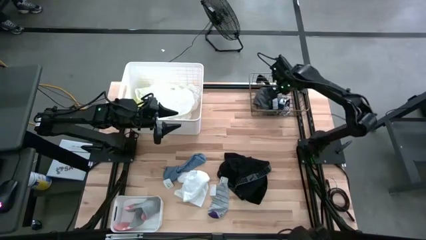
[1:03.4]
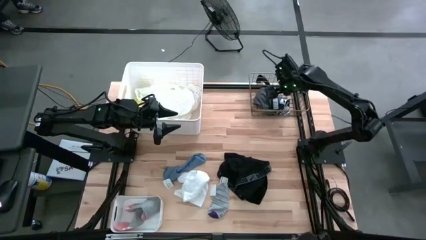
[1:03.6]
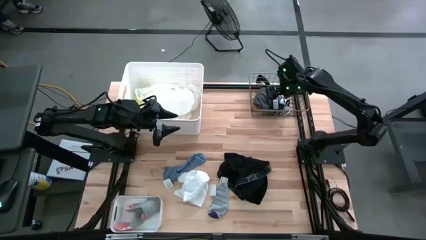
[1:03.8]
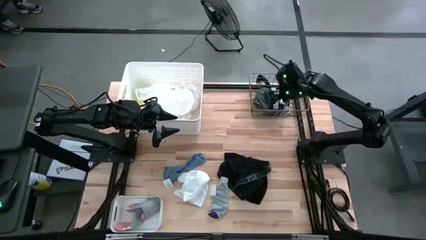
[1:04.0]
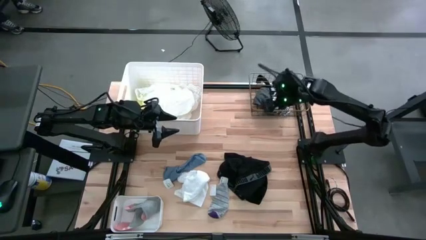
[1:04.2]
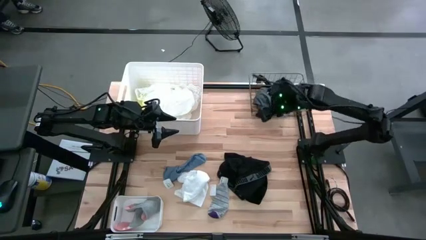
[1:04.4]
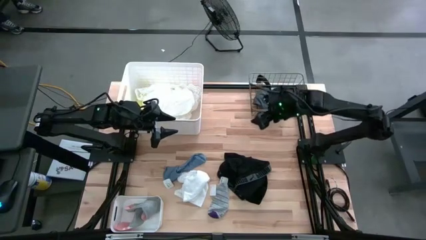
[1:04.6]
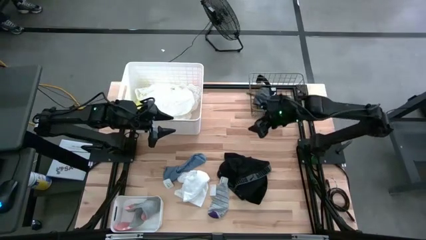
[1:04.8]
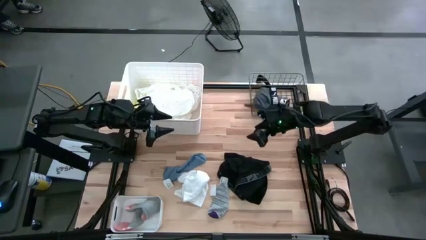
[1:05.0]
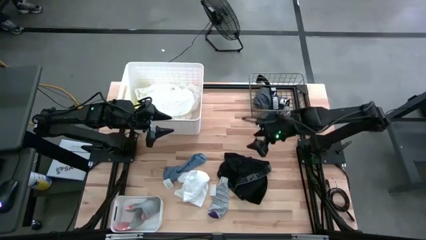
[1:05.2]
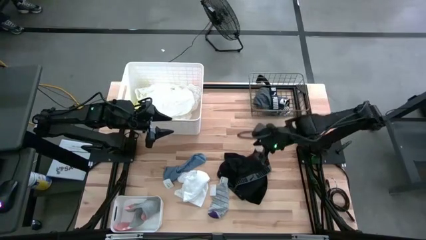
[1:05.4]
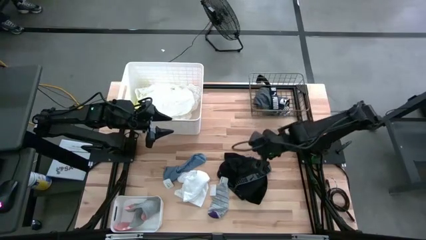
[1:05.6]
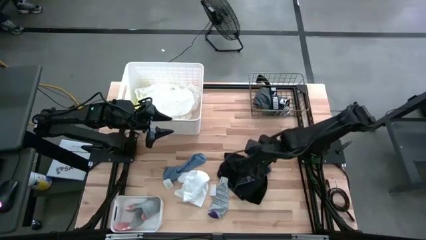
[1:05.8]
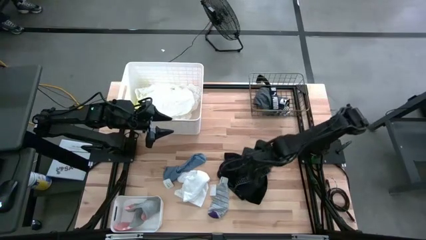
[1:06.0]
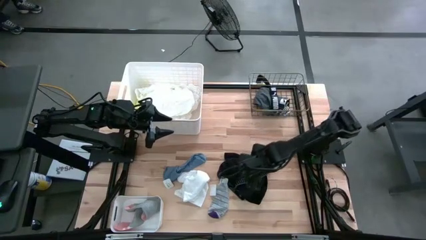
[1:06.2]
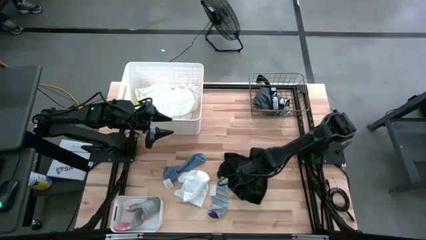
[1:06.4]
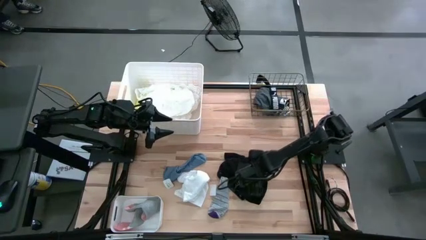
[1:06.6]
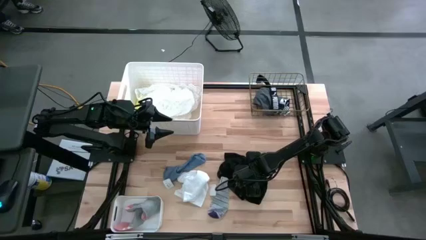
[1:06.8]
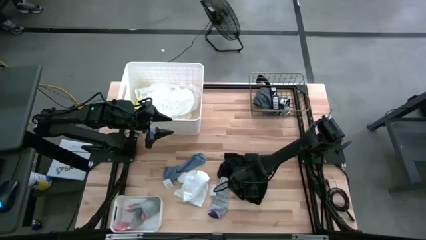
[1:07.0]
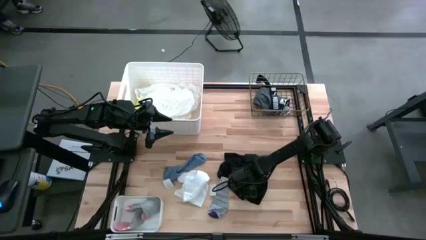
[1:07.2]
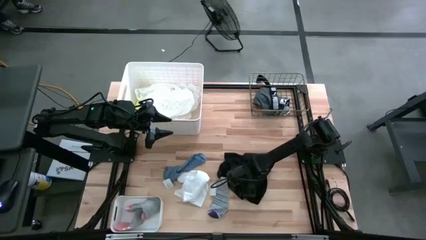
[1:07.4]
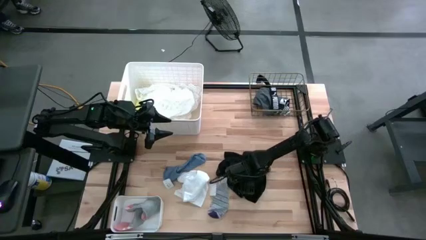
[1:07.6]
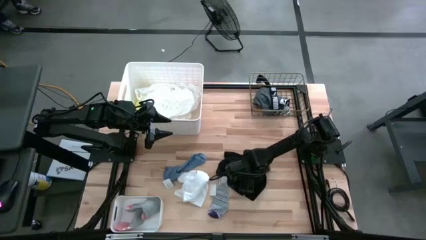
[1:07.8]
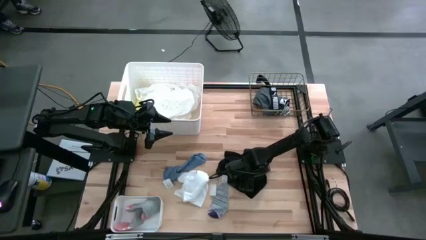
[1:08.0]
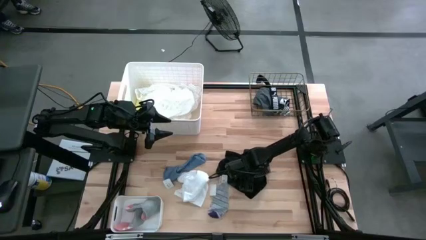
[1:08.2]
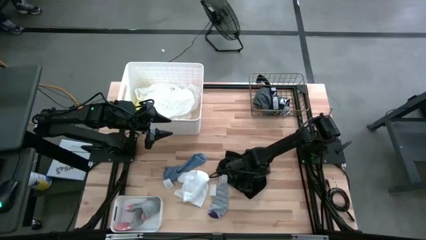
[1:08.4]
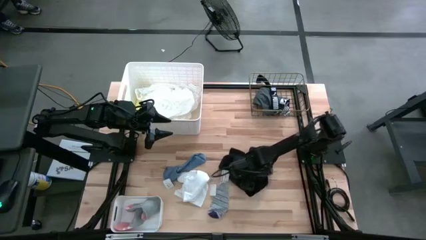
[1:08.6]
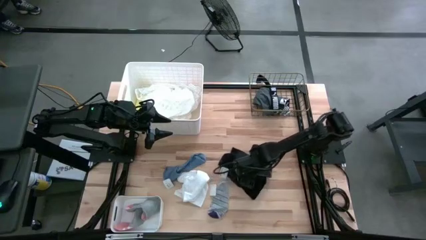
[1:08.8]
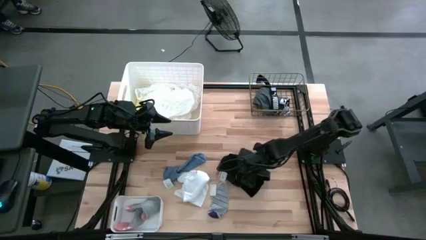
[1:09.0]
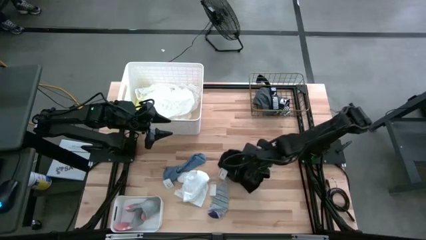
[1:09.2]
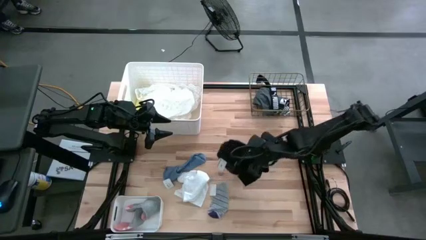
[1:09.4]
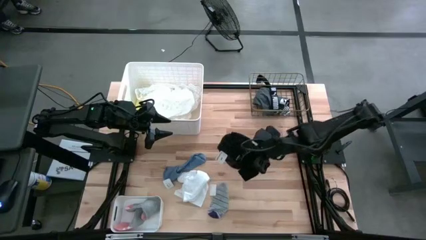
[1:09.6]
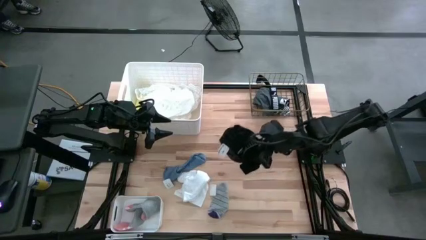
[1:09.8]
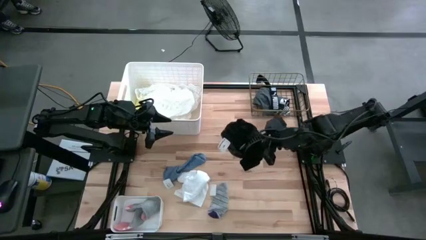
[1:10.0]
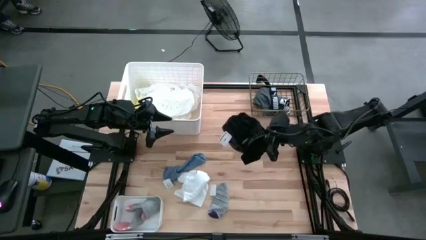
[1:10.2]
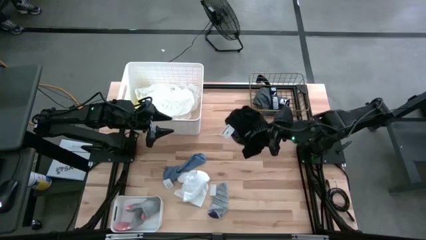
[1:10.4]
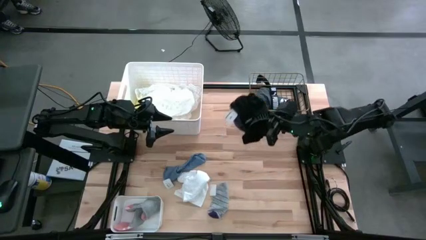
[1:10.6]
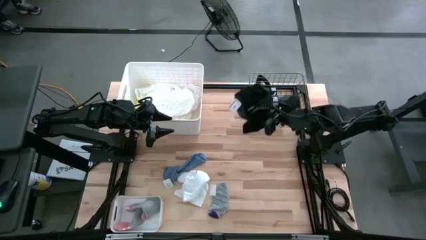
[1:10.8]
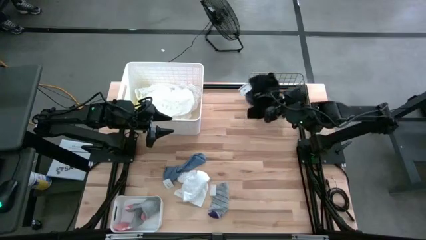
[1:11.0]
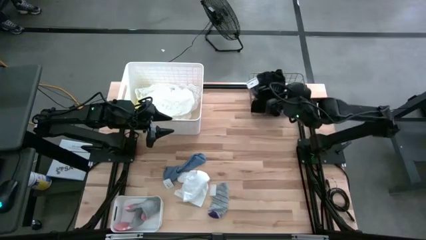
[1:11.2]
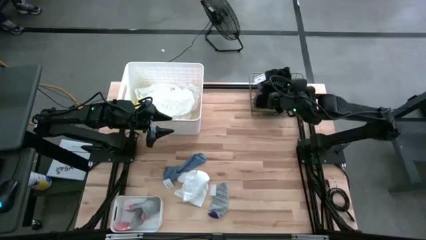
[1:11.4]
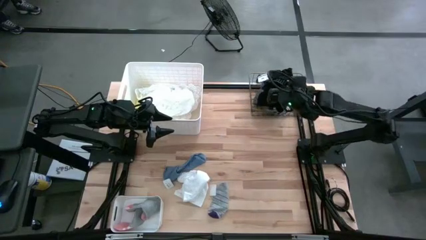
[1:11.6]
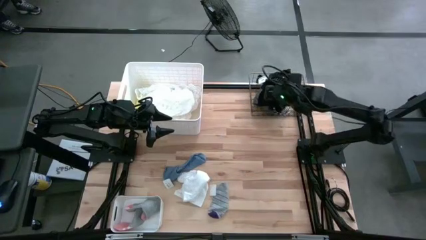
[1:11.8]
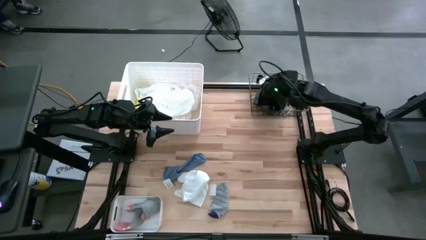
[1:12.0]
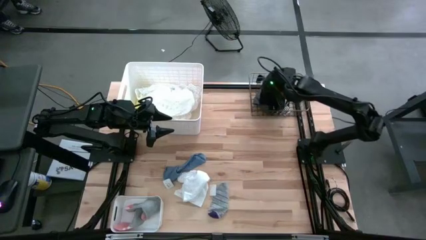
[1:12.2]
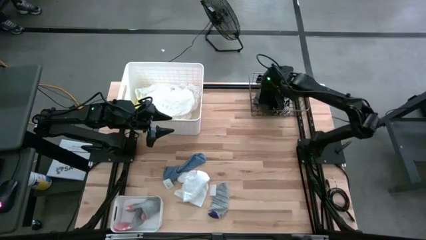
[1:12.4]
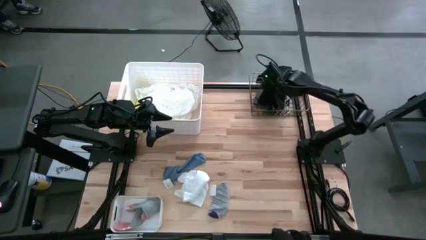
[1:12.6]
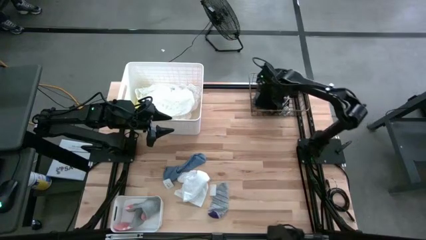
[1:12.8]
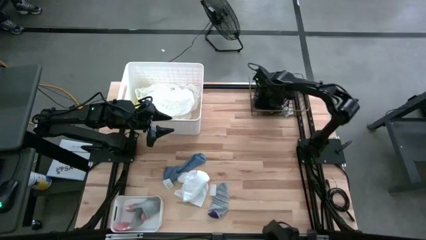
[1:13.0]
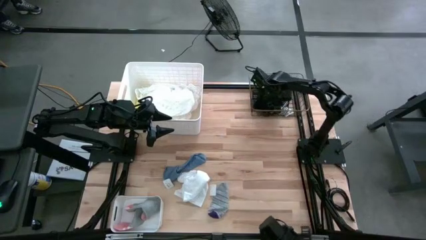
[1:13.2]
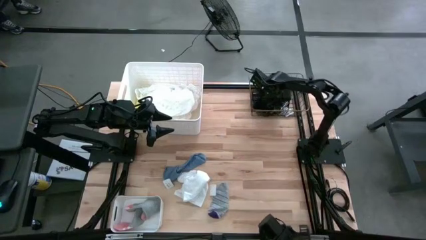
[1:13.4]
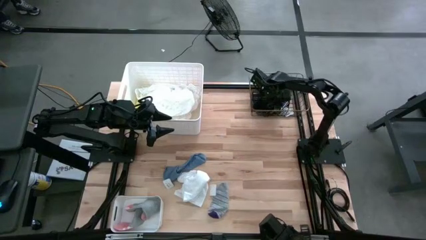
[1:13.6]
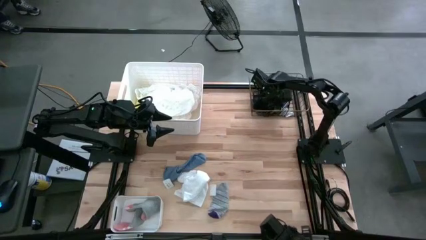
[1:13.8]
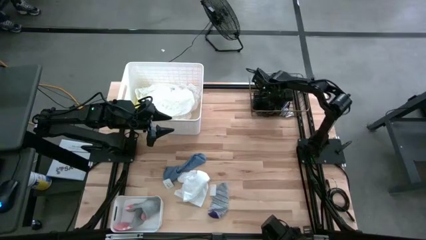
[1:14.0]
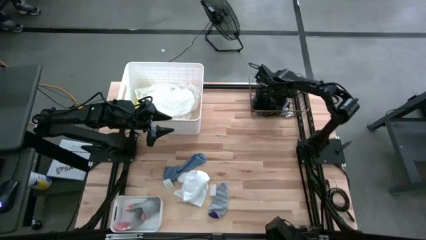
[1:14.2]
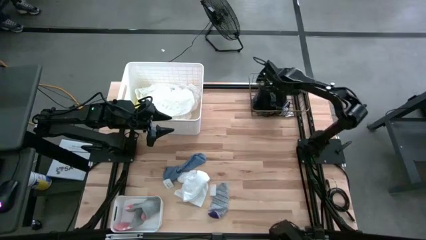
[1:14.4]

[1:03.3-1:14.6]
Task: Pick & Place Cloths
Put the black boxer shorts into the gold wire basket

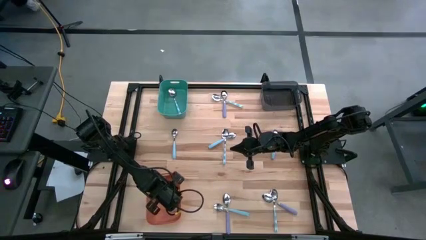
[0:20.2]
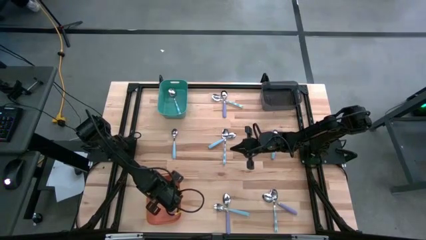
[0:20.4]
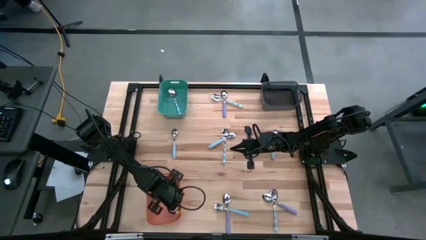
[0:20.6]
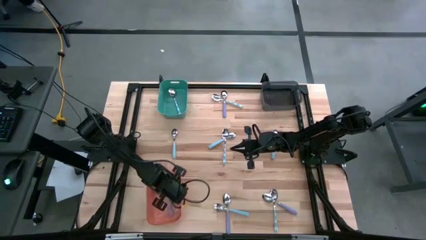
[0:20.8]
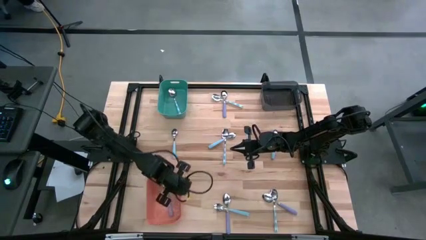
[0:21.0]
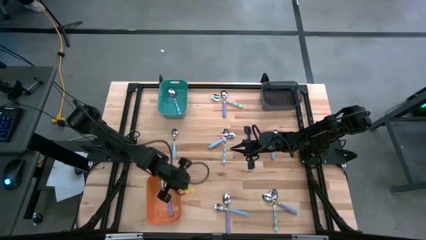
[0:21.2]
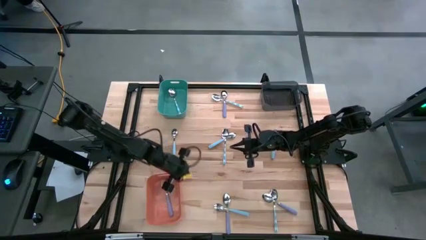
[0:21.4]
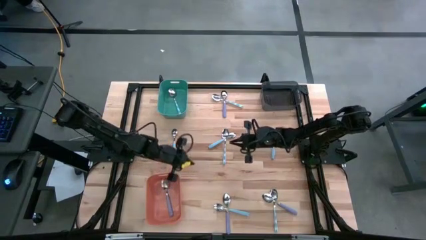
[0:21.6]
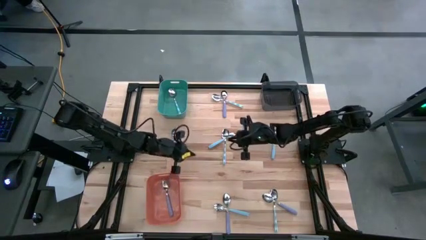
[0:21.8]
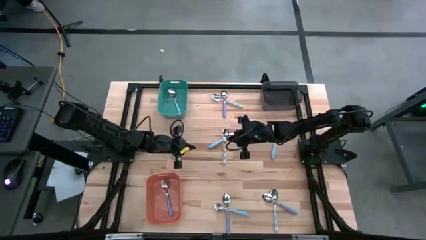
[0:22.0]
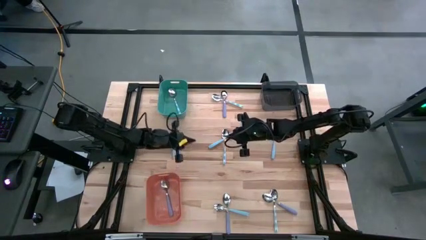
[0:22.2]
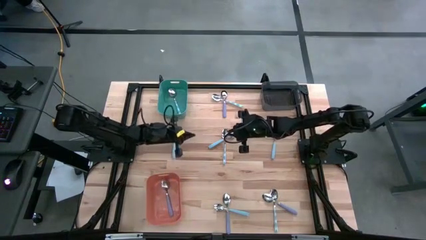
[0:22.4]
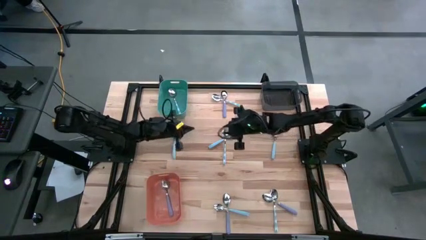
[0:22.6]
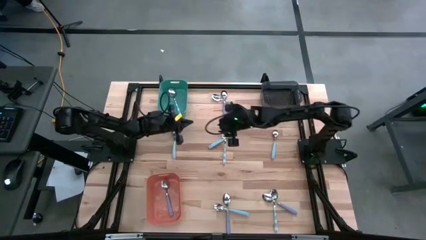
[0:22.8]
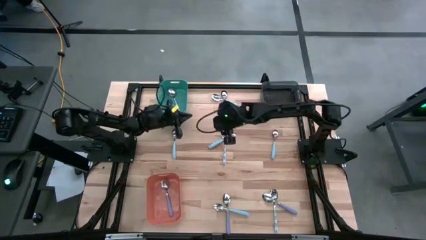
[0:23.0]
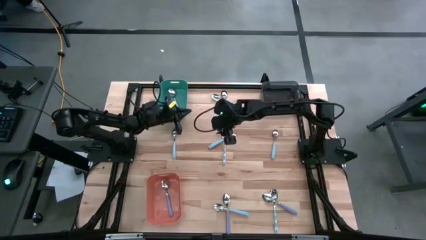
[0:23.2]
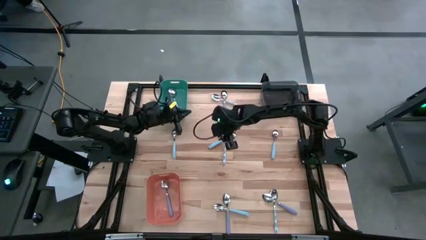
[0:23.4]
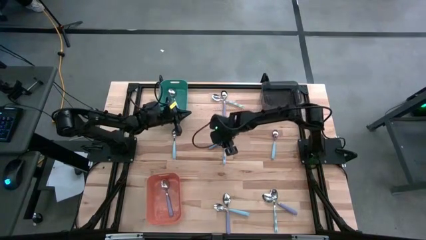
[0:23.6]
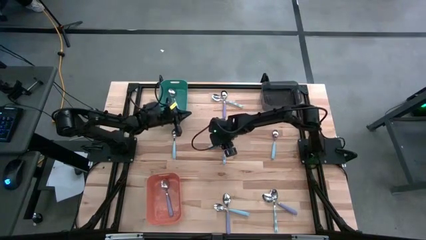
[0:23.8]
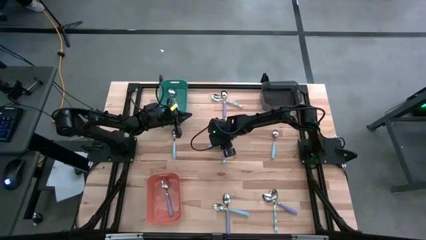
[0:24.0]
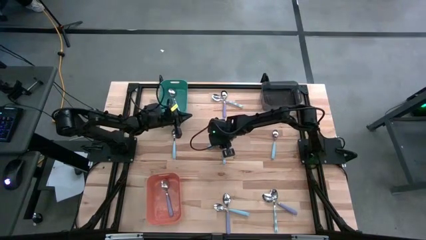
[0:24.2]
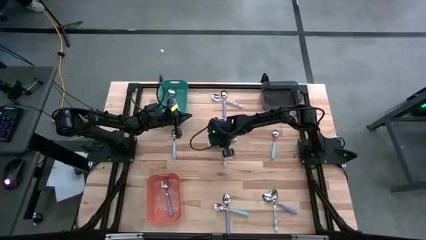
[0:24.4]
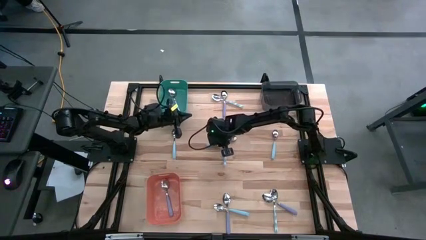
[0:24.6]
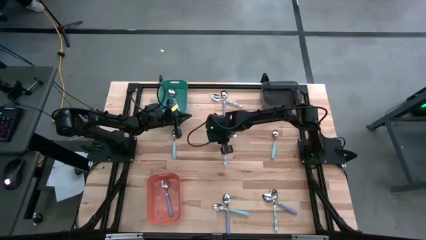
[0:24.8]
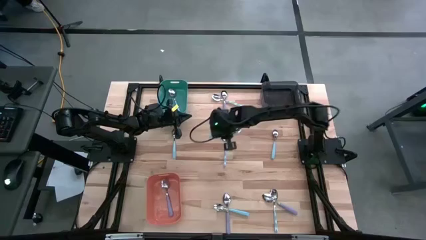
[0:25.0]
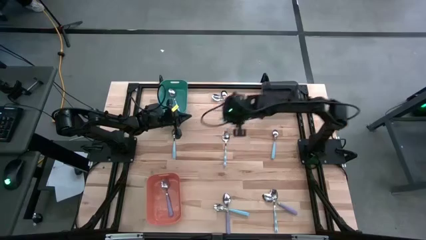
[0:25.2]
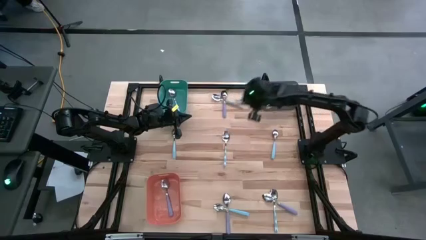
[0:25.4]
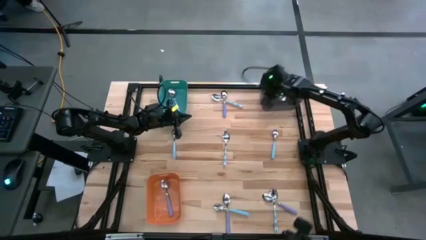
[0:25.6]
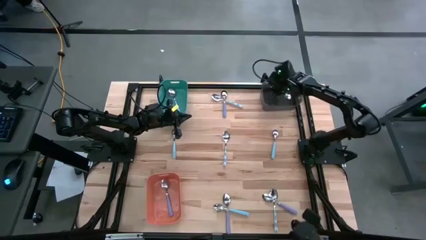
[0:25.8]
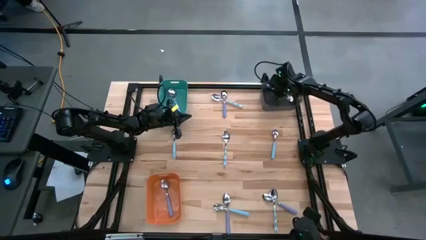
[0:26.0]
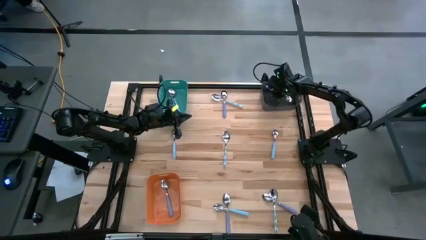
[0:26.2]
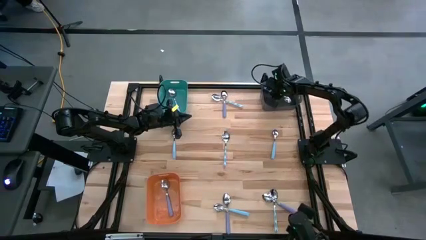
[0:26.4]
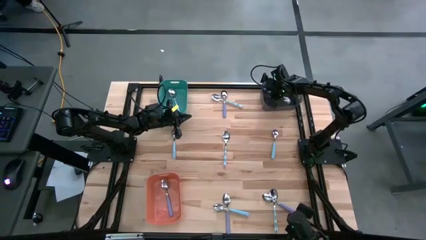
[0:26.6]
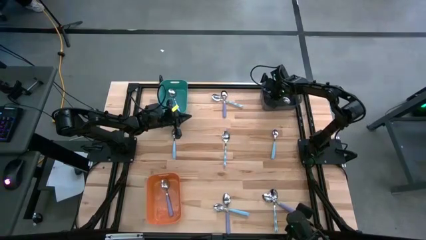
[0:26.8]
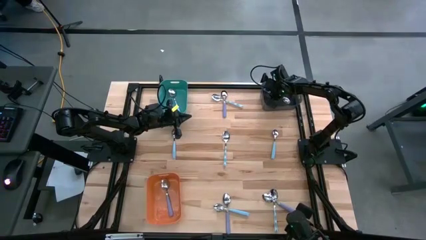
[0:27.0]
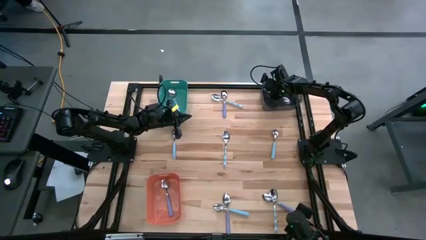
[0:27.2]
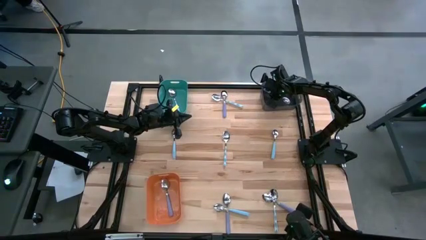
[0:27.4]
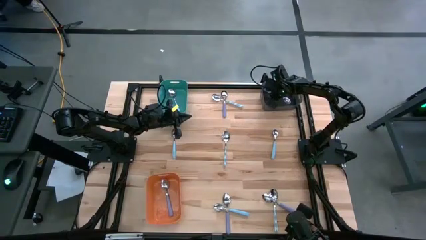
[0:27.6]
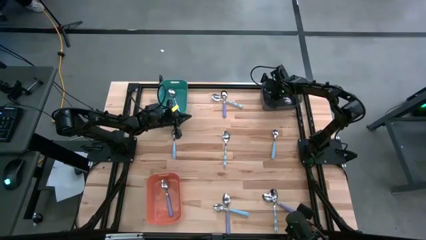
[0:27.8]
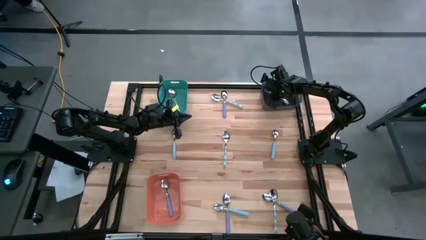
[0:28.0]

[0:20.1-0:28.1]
Task: Sort silverware by color (type)
Put the light blue spoon into the black bin
